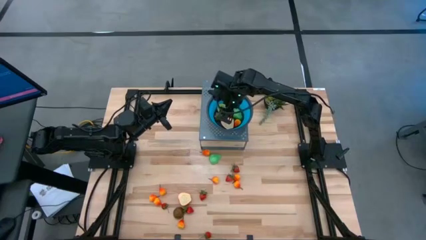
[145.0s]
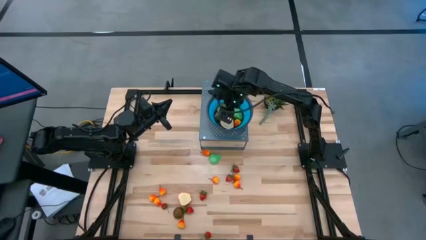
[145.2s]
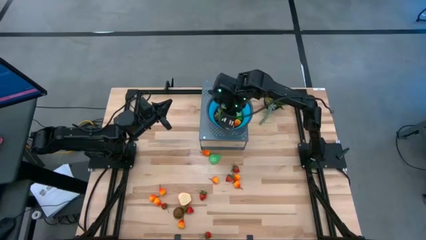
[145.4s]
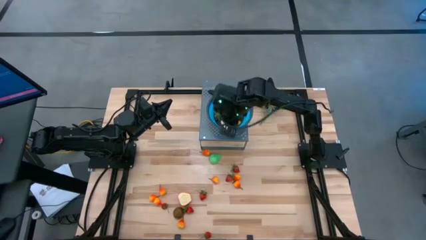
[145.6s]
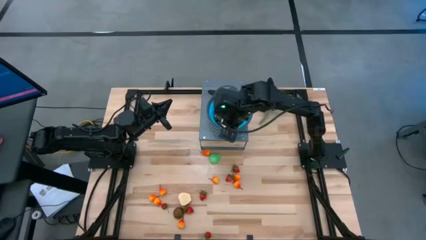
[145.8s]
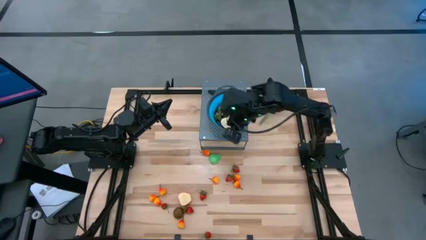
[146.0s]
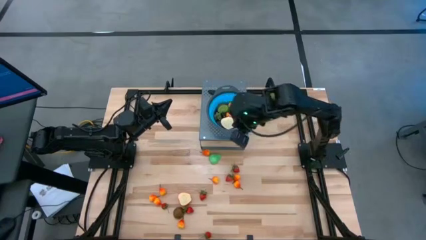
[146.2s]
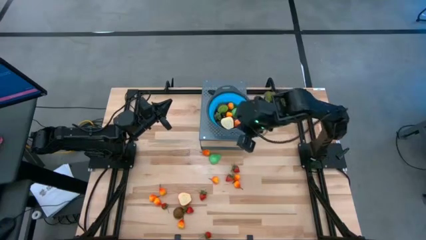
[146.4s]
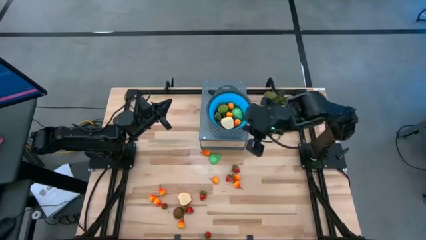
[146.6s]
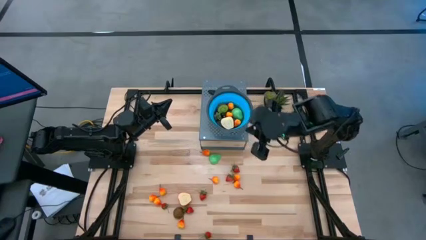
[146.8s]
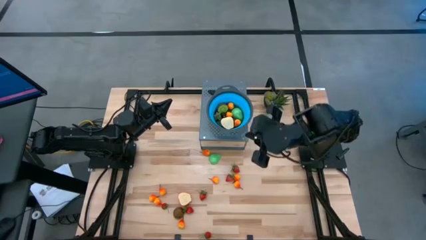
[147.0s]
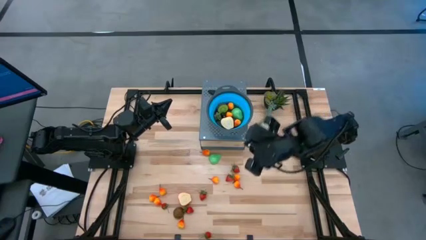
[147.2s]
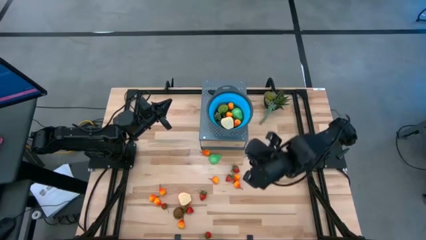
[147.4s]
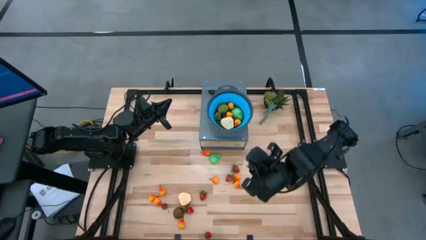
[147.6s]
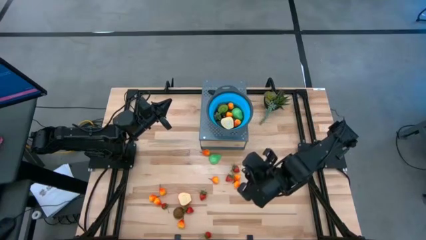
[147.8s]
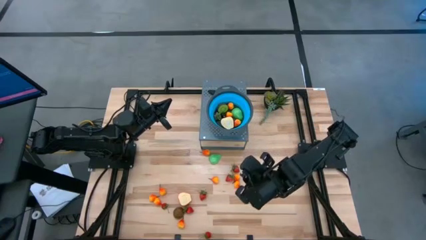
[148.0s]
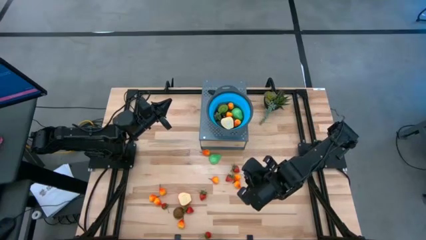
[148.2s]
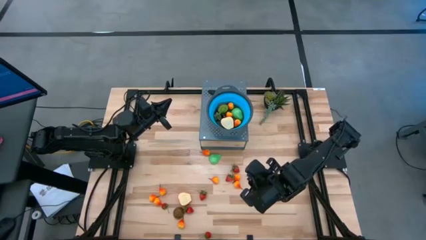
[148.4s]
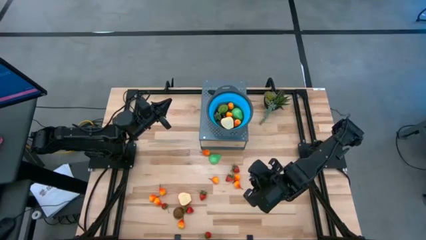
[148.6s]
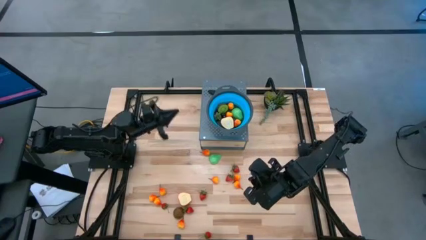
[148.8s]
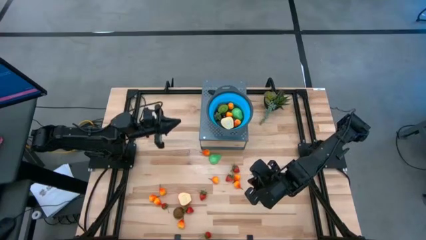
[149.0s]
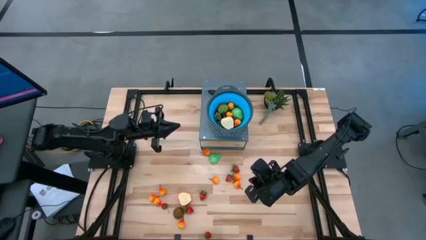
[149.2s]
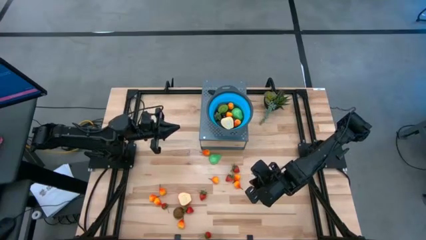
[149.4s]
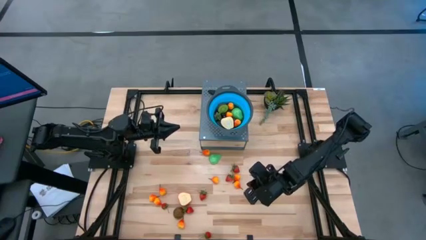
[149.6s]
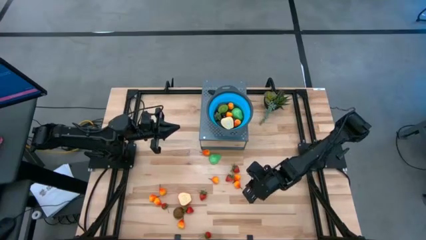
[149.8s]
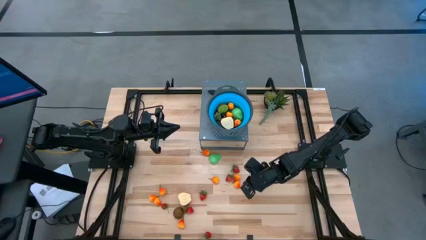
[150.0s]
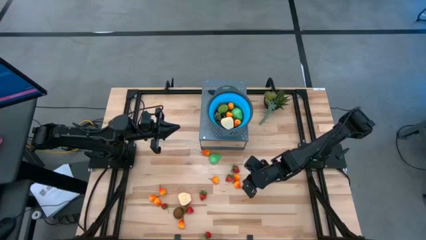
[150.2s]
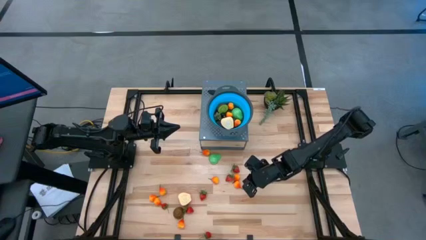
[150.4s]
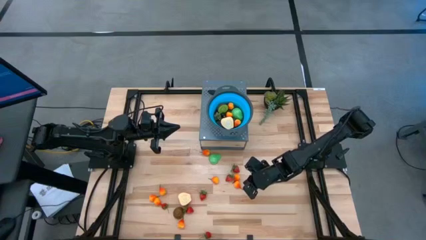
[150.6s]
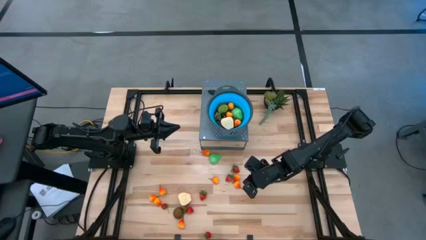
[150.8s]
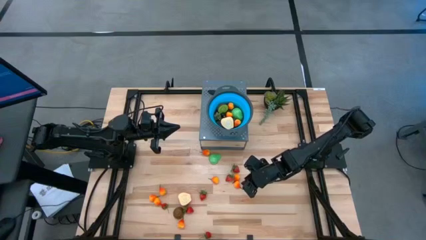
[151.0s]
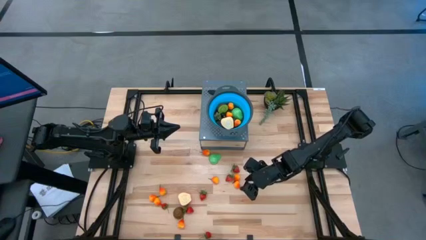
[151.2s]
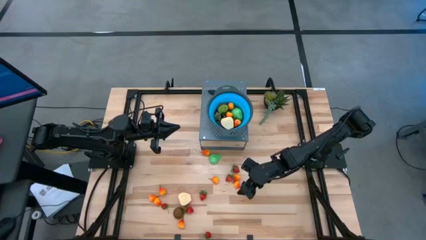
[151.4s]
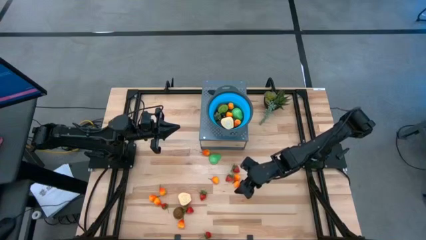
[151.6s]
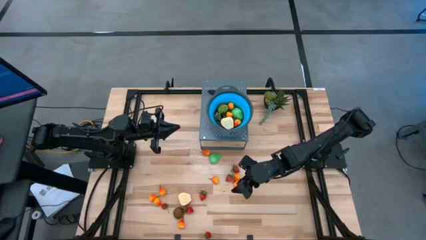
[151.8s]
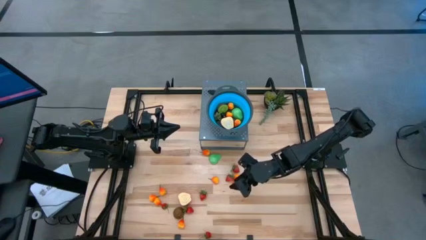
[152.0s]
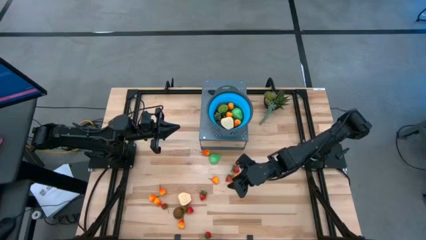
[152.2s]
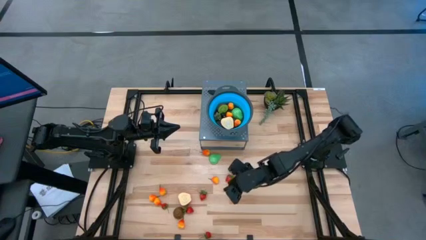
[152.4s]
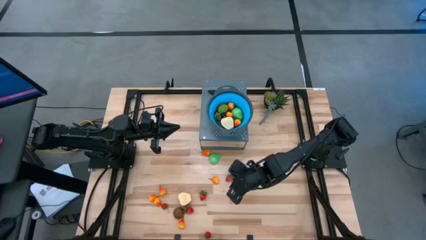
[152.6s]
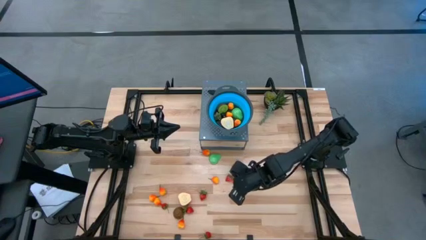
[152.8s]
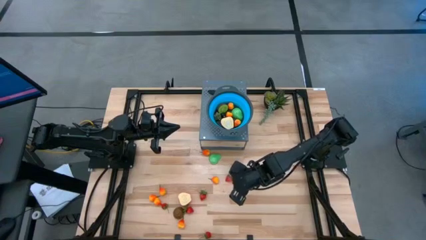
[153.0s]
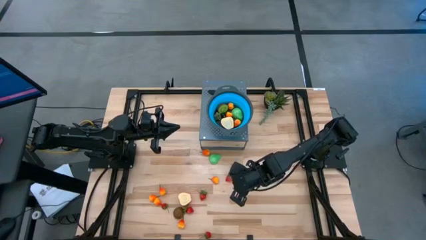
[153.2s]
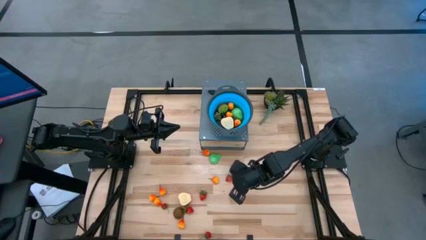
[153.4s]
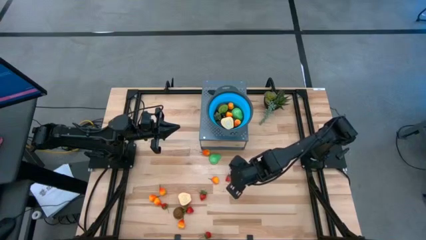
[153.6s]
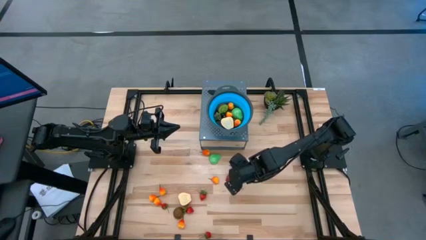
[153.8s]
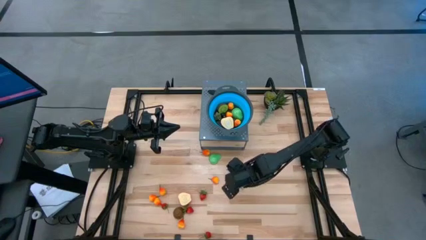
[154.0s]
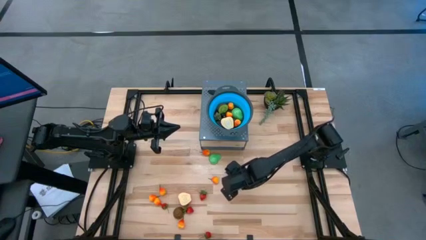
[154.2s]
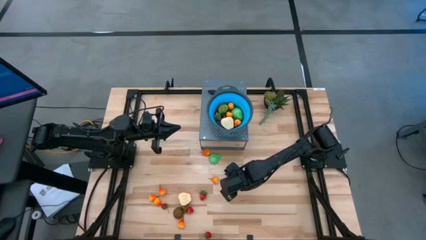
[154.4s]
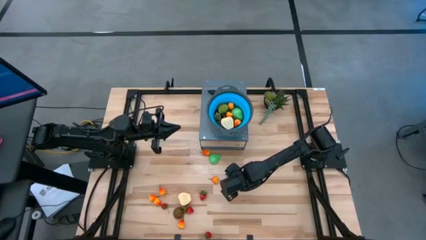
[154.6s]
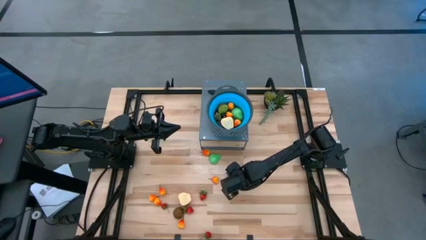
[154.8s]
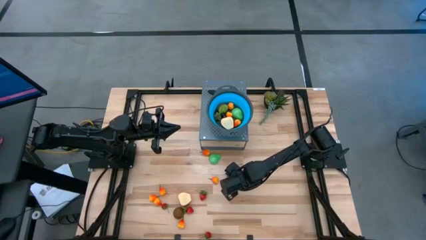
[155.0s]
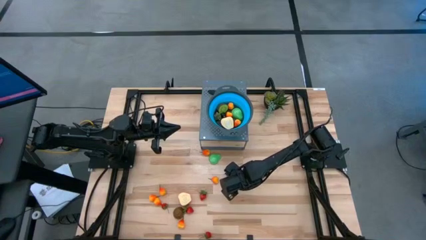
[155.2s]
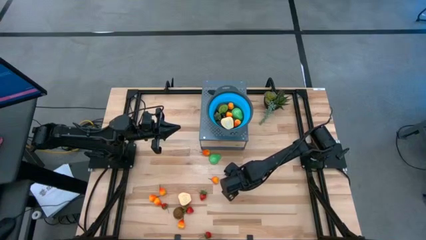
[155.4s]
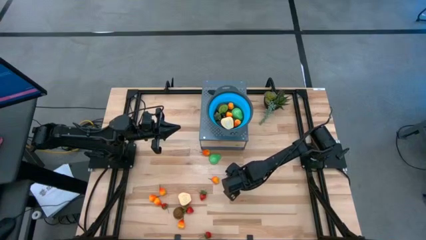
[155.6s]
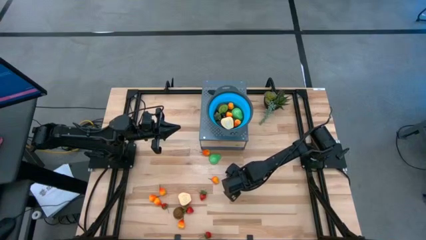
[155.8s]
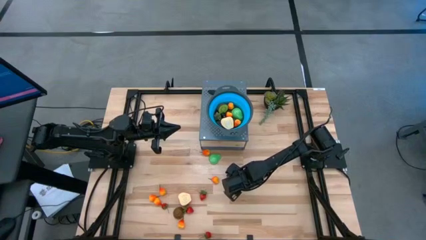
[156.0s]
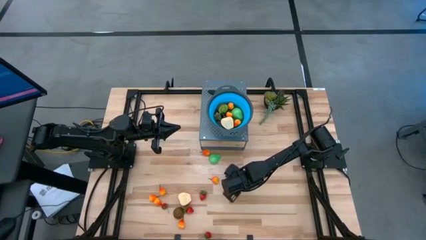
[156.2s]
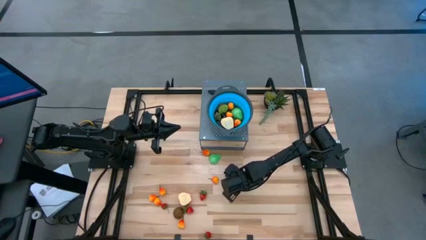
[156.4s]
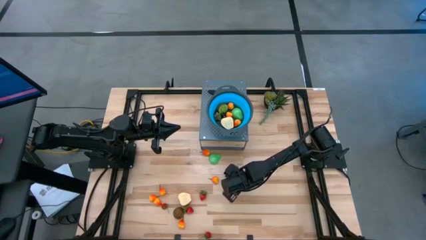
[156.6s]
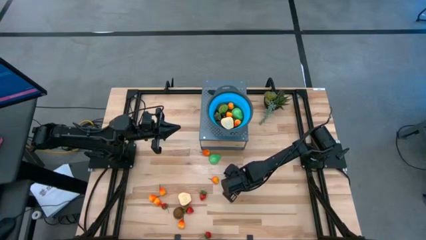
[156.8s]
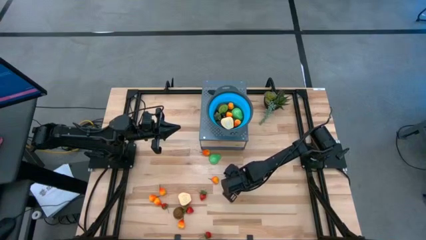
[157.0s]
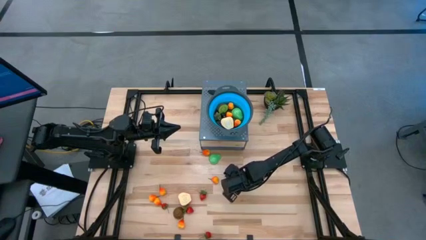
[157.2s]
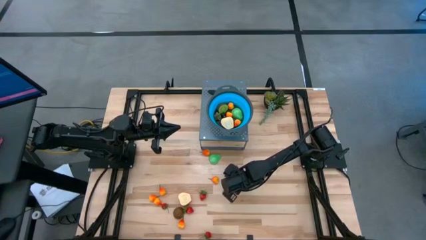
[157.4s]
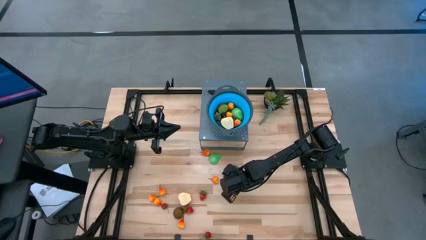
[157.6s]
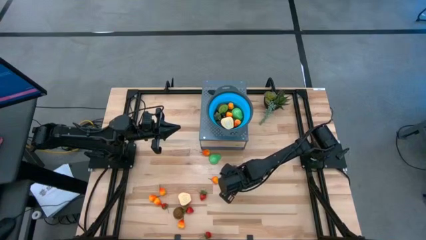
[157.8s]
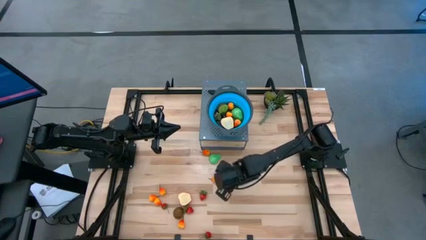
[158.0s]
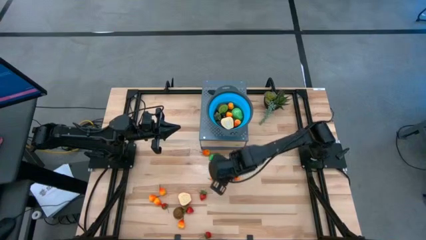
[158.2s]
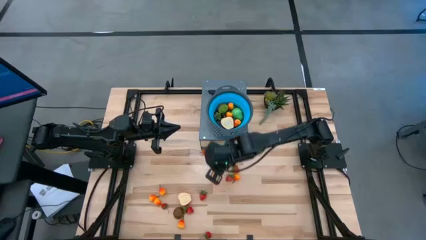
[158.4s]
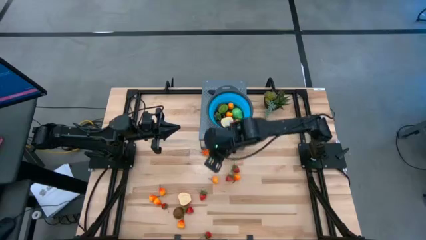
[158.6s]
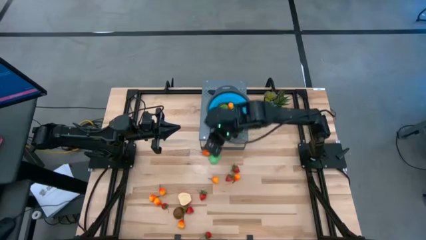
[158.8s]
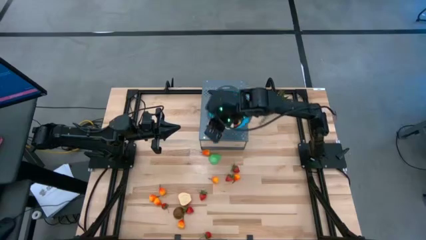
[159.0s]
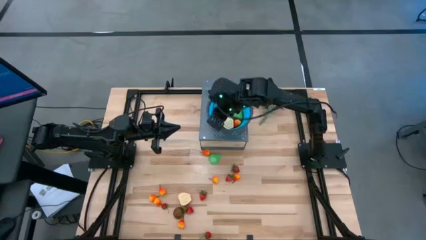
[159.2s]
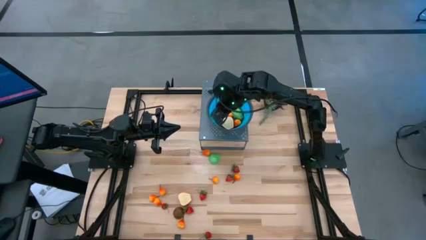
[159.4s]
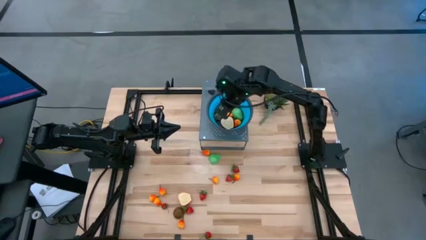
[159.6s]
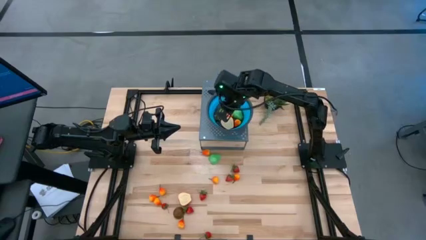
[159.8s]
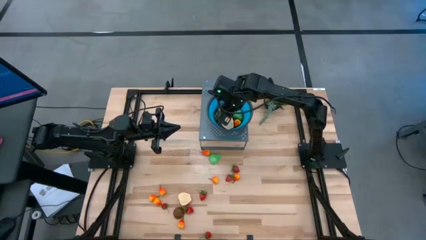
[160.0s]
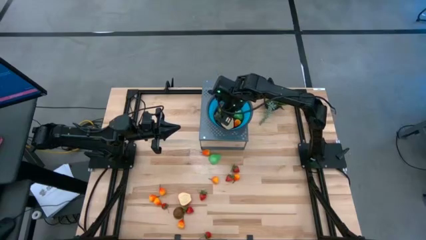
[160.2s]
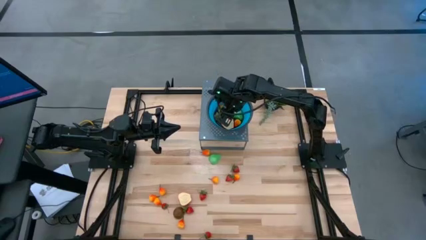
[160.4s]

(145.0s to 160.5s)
Task: Pick & Place Fruit
Put the peach into the strainer bowl

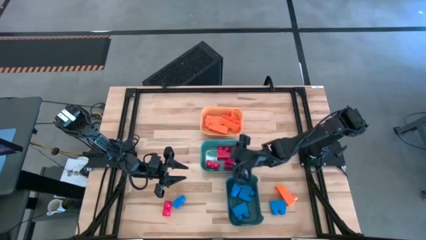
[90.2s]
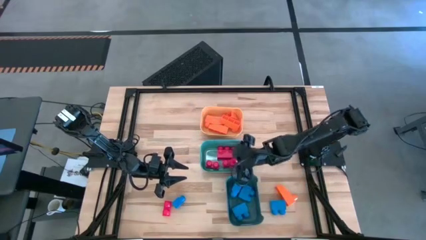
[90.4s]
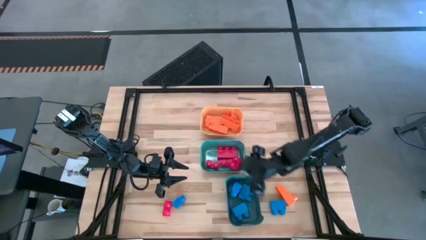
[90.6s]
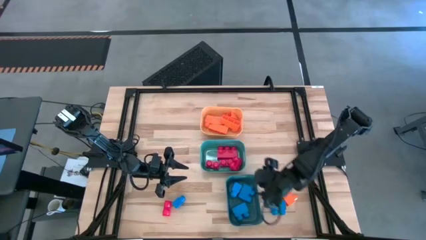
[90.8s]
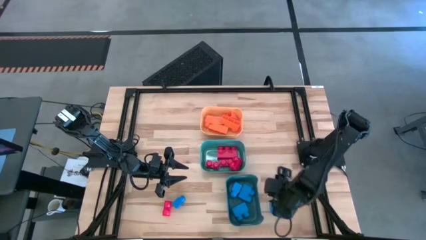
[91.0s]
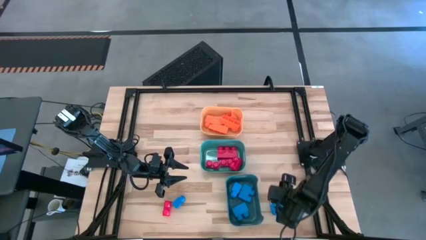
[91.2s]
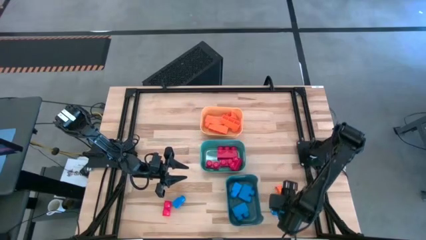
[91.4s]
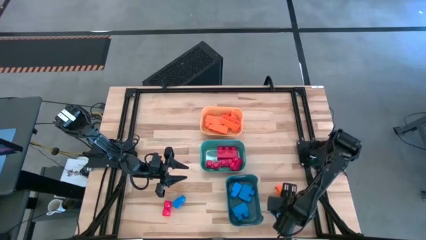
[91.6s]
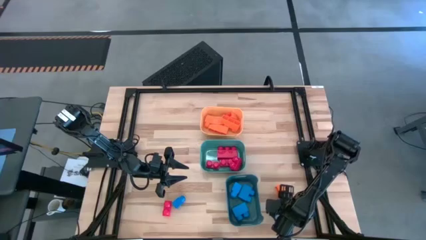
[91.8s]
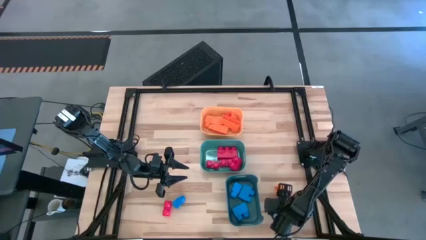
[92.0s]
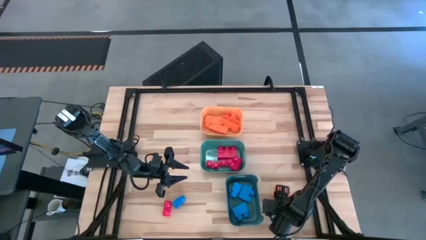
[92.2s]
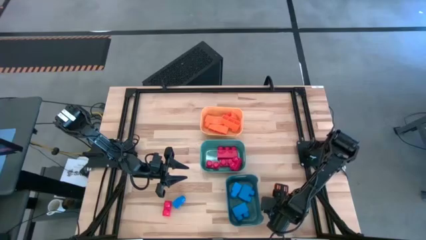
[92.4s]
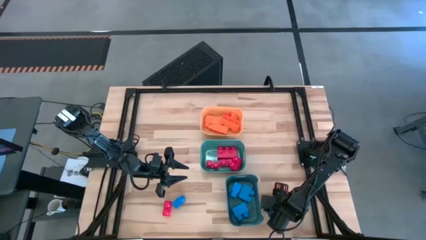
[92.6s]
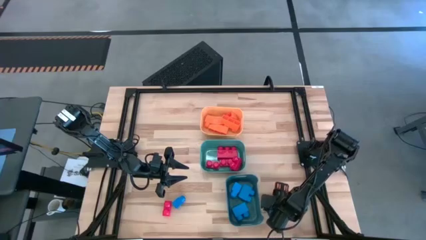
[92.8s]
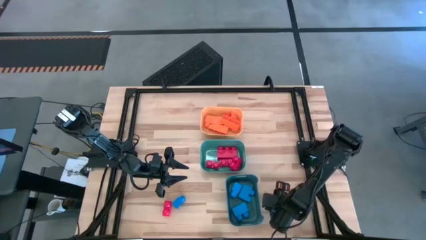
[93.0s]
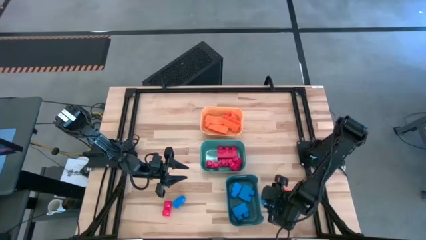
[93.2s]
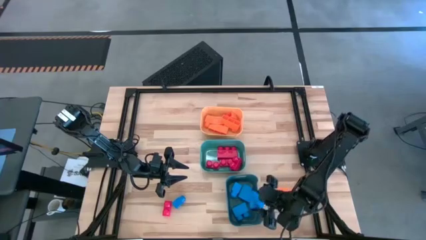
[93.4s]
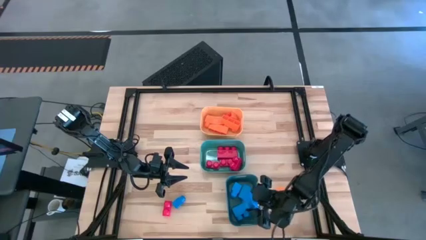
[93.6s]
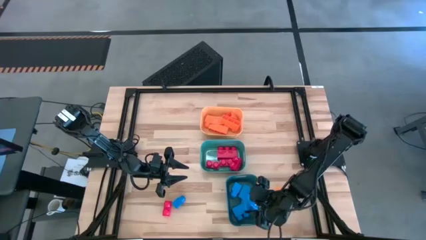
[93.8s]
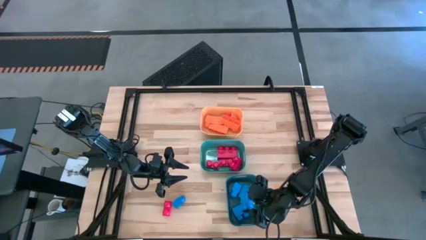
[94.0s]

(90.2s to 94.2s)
Task: Sort & place blocks by color
Put the blue game piece into the blue bin
